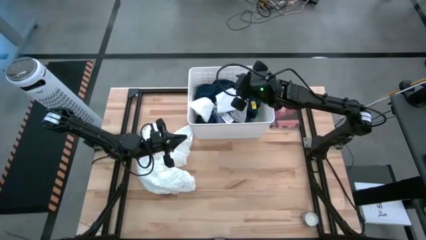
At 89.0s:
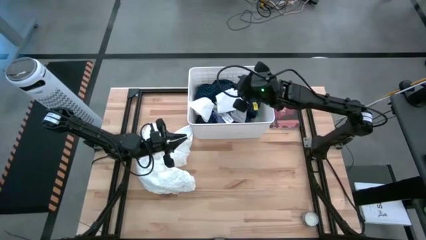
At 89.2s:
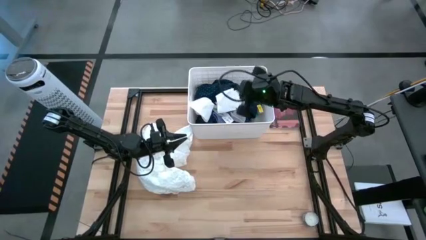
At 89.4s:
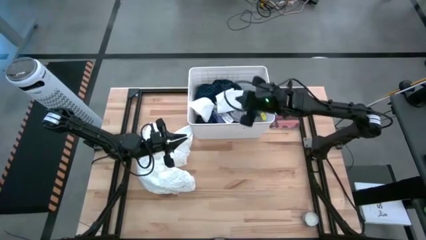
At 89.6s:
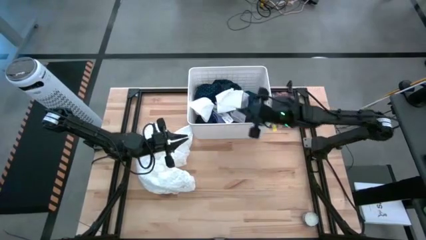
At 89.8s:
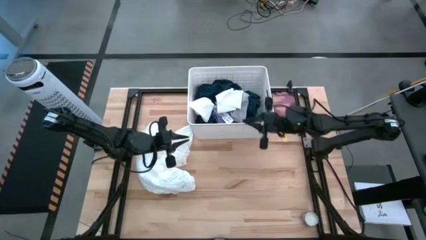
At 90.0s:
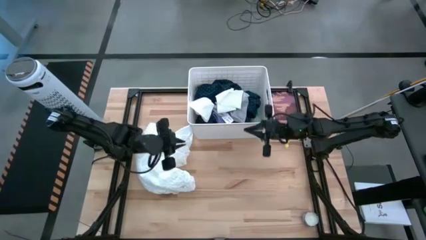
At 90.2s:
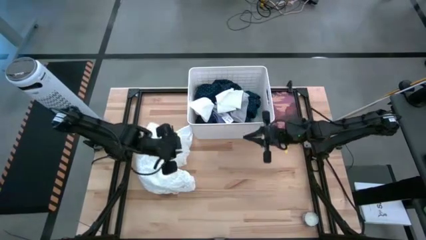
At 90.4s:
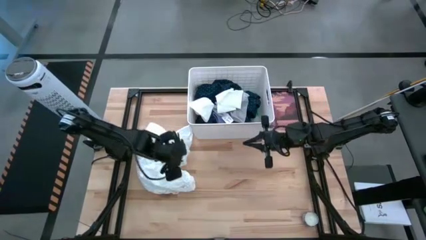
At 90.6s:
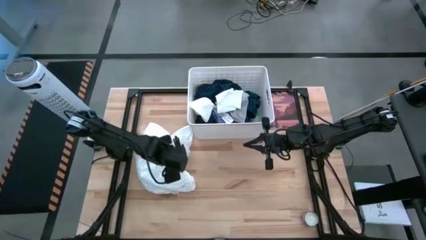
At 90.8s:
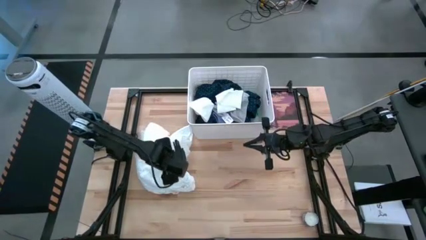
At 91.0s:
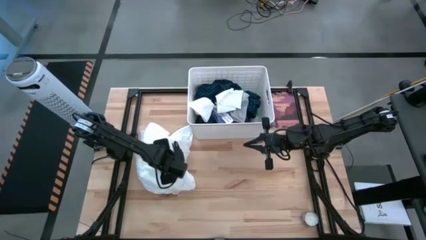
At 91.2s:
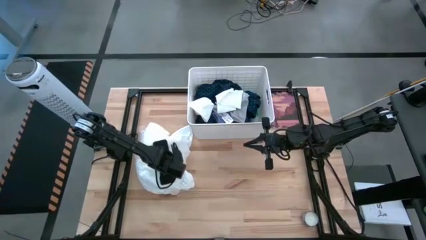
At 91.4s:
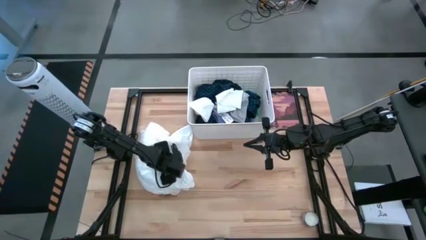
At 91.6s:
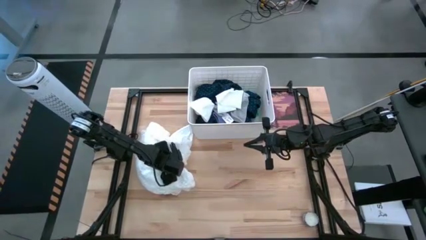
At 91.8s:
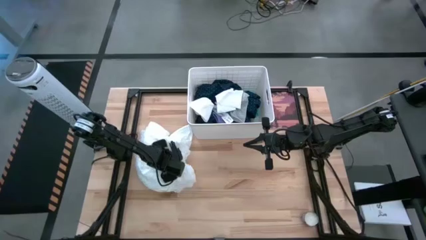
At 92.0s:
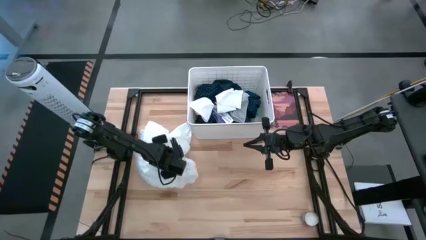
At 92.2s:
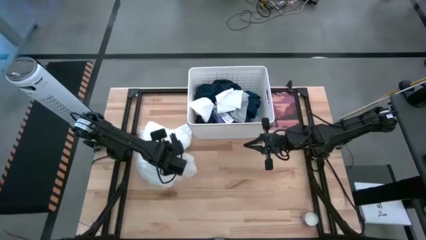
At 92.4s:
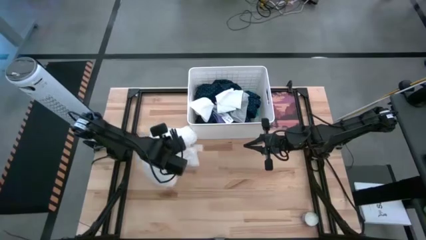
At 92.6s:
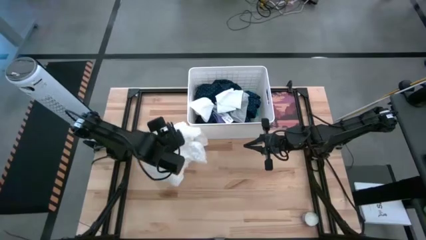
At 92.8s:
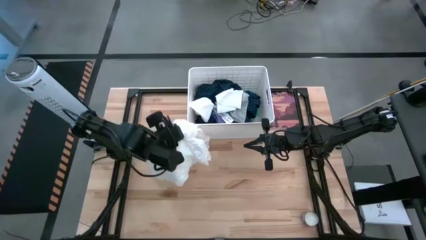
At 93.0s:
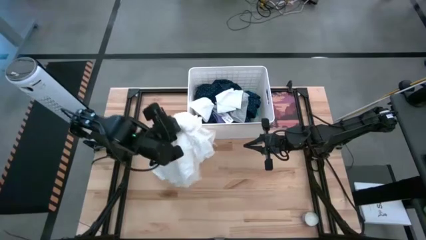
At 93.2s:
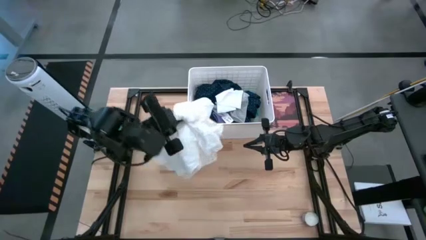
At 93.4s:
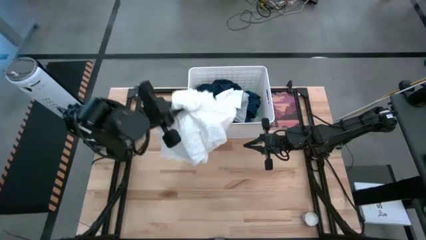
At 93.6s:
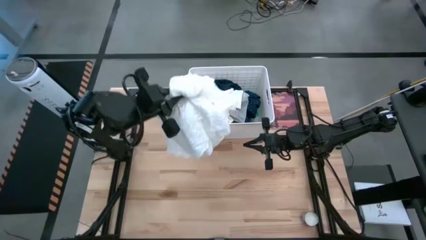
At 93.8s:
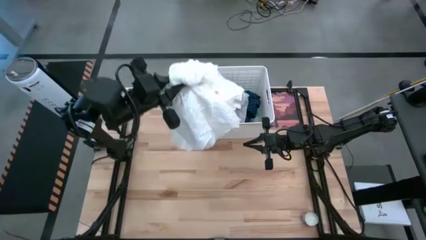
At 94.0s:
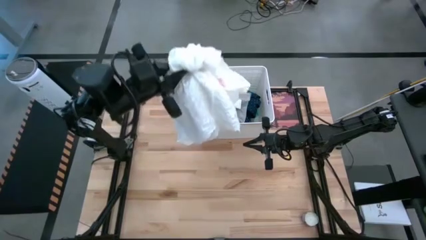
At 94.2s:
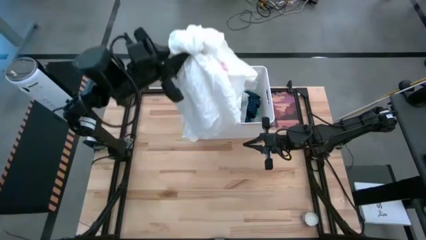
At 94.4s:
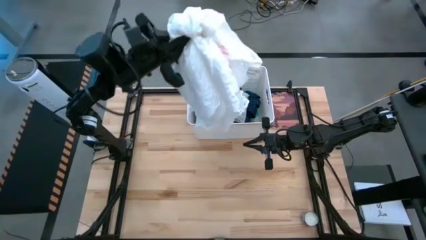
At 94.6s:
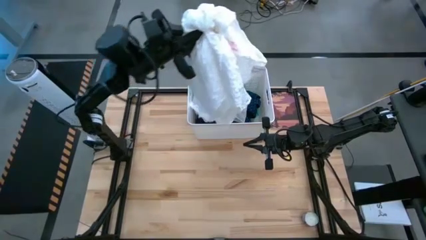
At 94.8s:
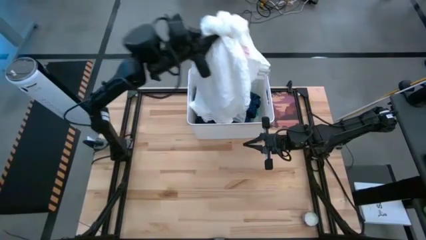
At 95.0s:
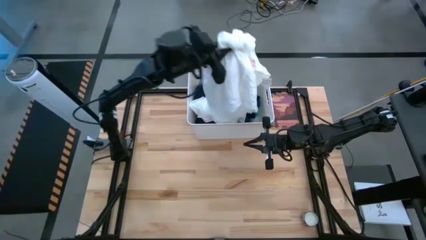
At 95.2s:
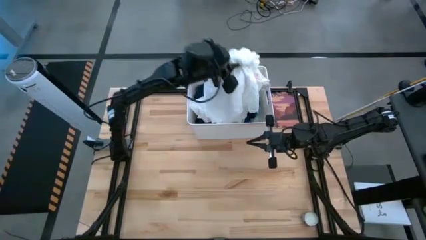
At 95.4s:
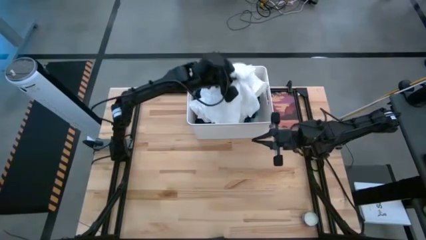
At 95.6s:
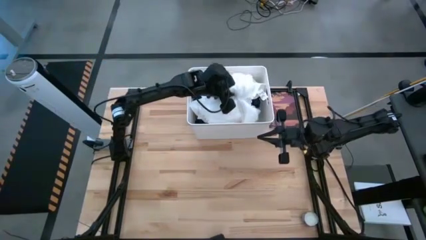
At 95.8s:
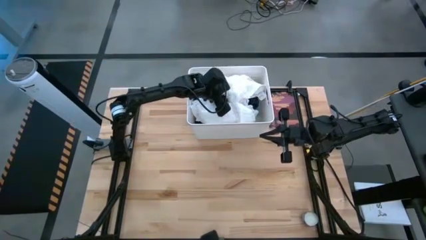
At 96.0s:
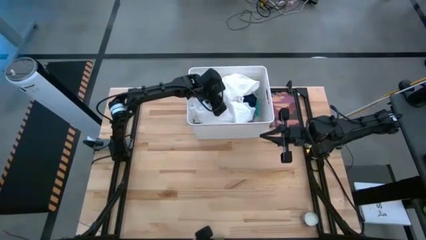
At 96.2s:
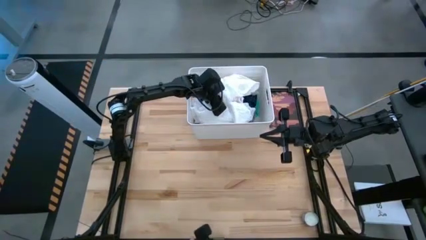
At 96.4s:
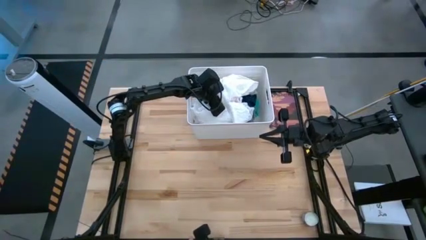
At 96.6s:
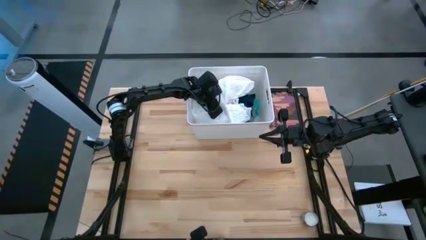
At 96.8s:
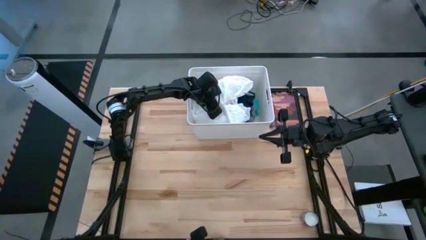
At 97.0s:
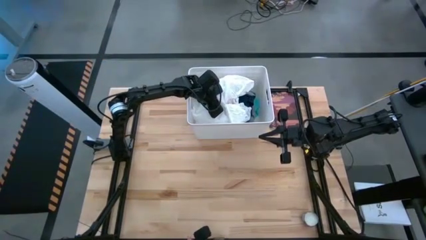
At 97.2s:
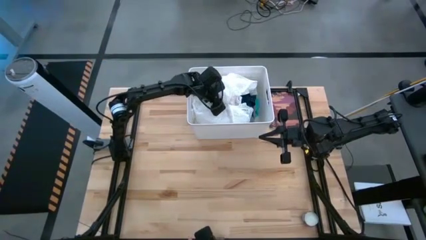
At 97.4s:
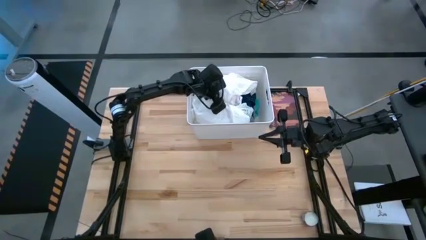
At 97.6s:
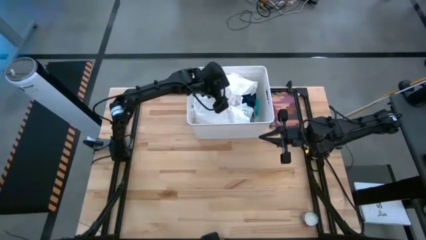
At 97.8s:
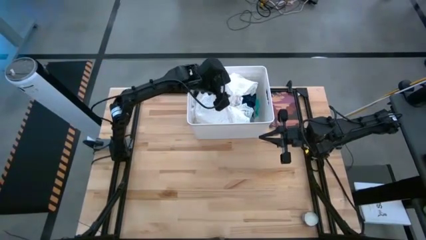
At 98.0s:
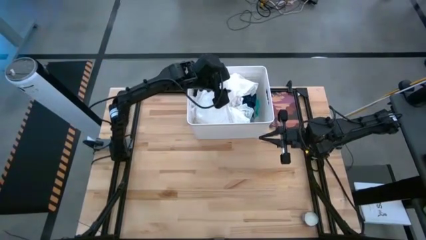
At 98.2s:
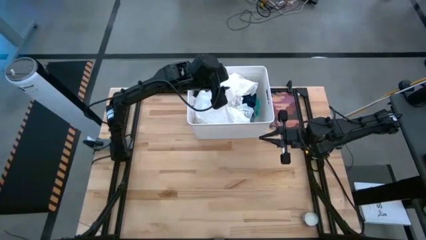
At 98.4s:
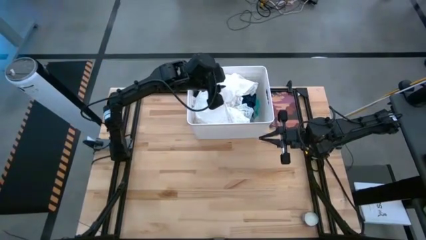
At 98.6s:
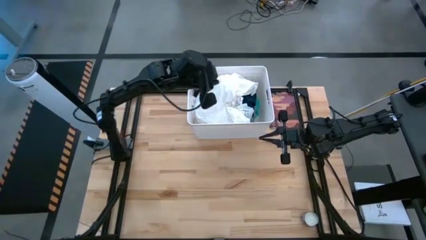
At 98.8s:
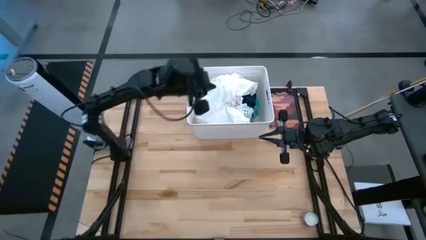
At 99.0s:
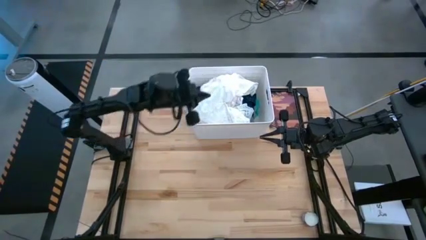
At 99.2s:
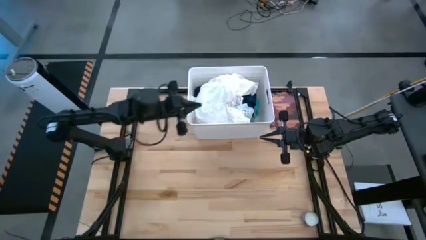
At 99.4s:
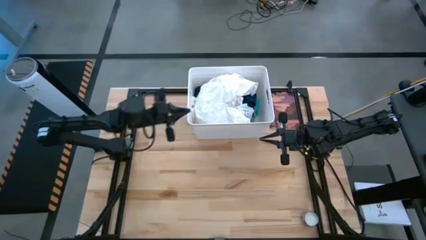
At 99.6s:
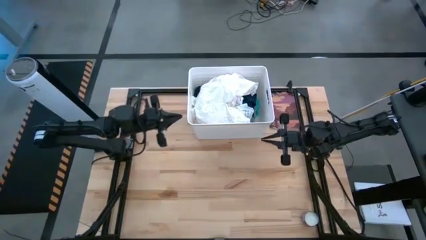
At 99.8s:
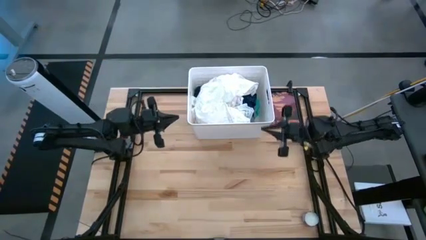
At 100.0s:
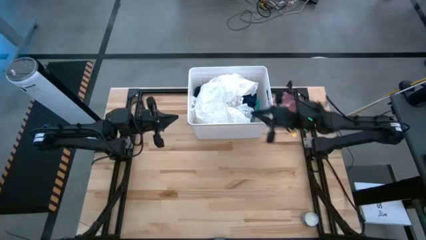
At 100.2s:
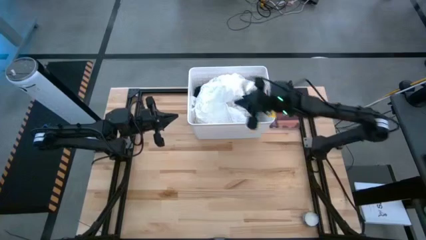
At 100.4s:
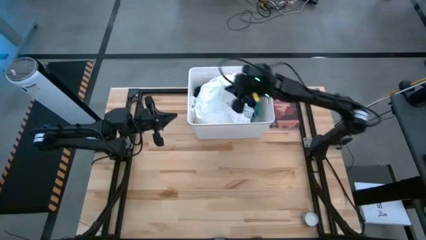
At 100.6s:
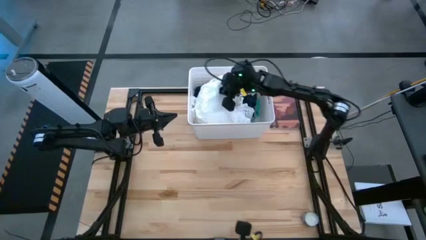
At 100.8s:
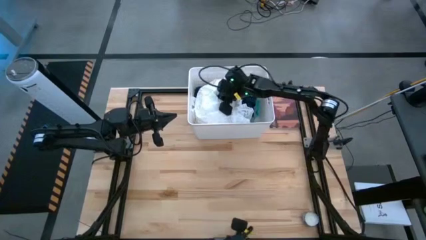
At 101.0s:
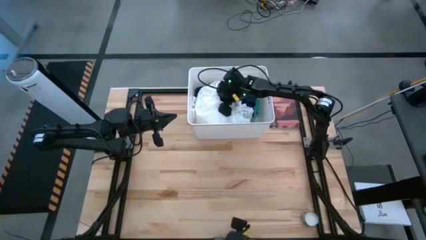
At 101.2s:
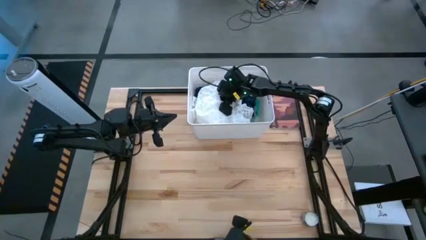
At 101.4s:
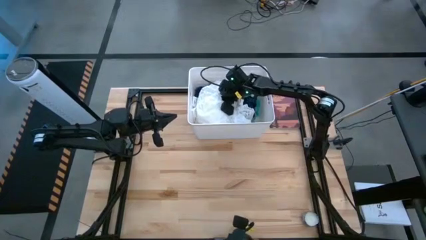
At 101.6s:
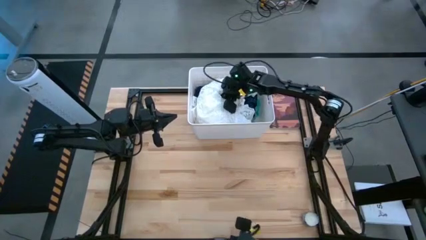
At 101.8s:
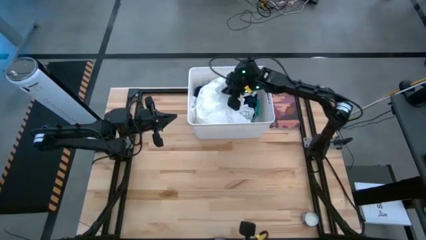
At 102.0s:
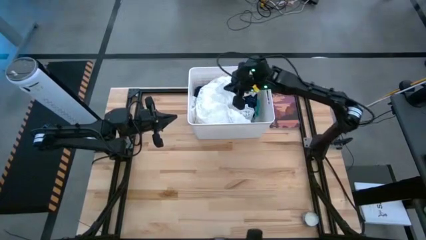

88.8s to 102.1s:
Task: Sort clothes
Put the white laced blouse into the laundry bin

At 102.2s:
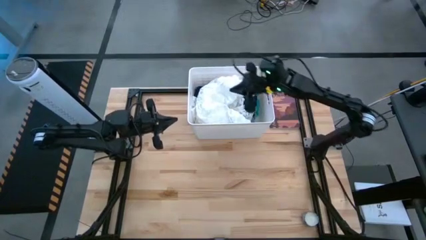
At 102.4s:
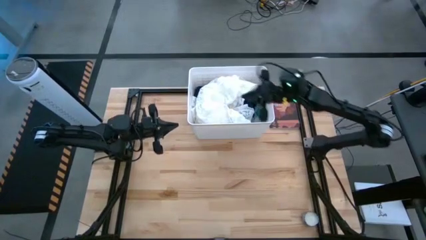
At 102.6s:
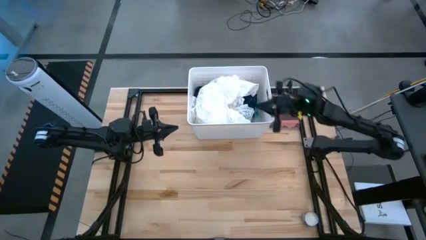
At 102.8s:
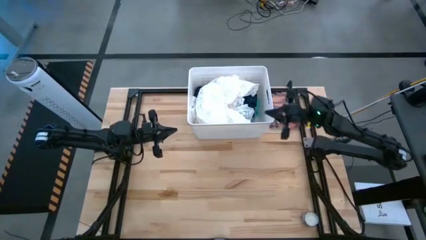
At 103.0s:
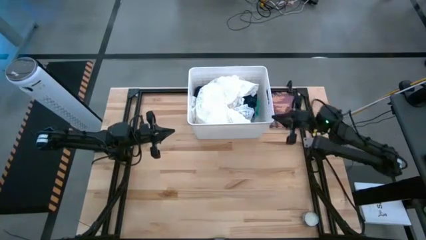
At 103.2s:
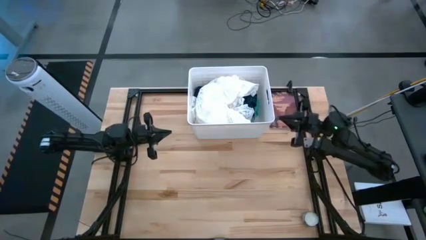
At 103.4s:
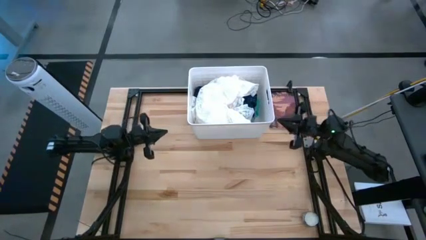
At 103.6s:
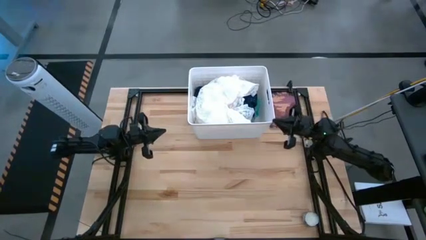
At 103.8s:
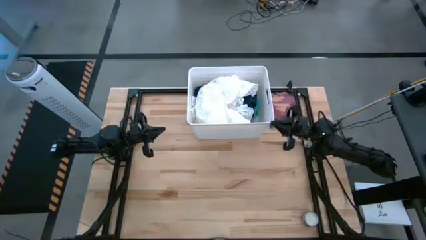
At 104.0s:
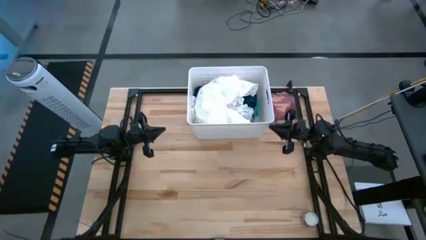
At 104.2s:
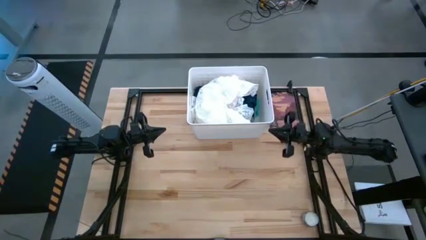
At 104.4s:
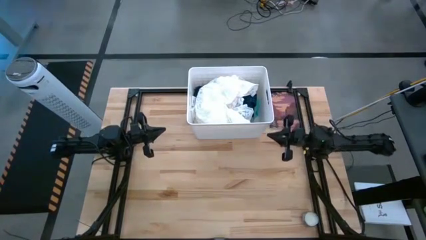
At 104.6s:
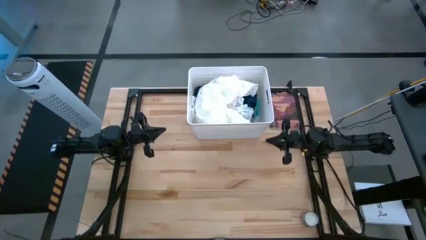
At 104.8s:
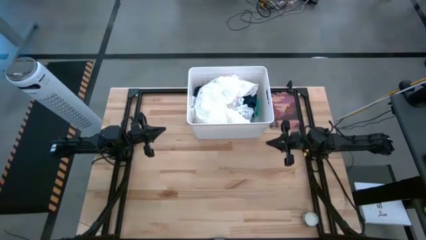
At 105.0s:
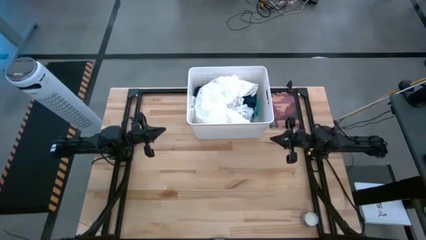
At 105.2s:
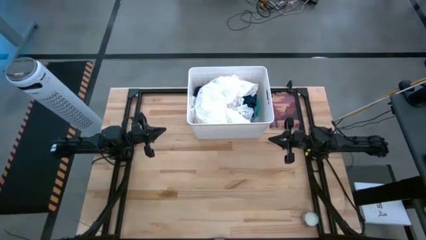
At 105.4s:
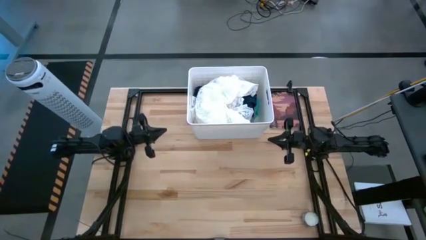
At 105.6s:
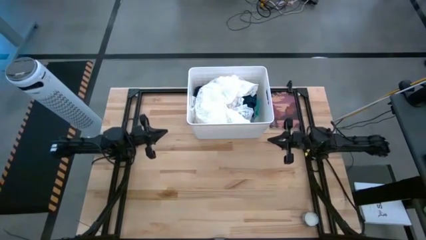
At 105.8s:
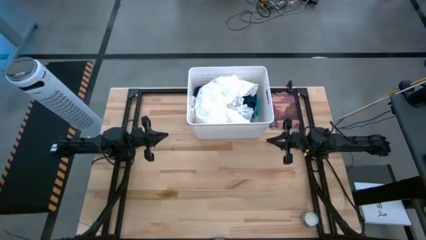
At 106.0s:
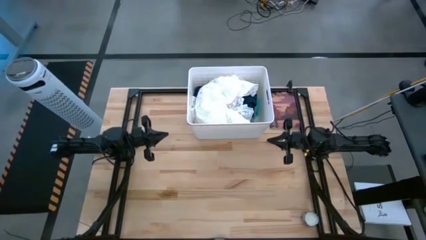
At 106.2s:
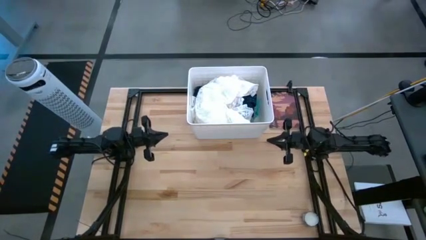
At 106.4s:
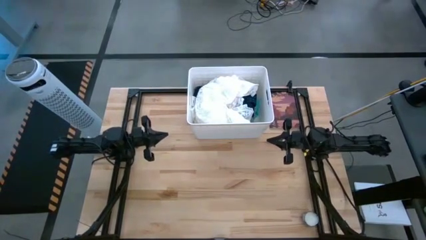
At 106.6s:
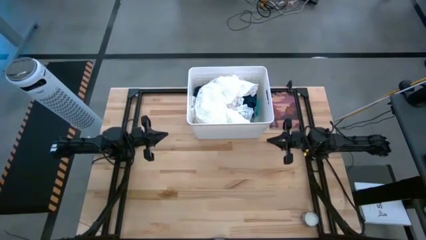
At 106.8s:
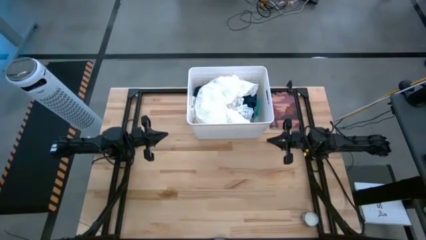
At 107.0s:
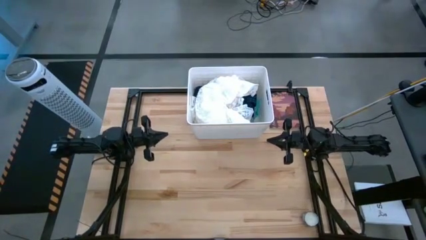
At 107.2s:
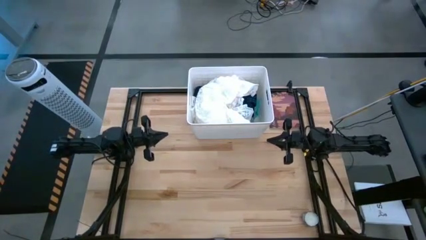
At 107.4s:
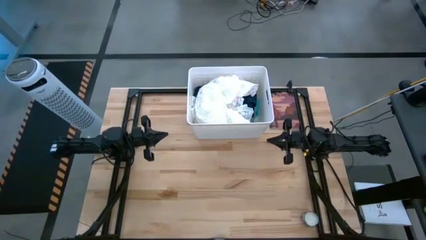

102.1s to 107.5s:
Return to Home Position
